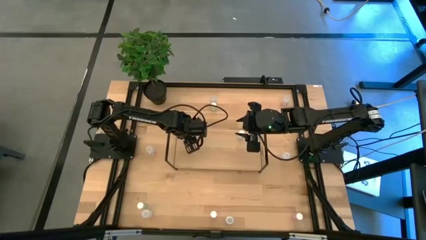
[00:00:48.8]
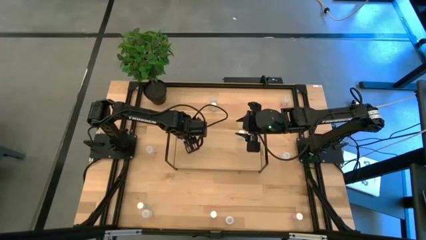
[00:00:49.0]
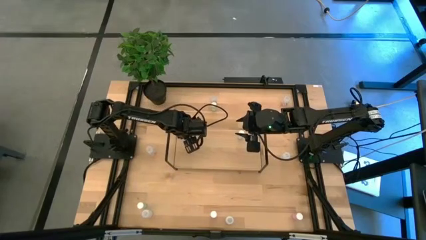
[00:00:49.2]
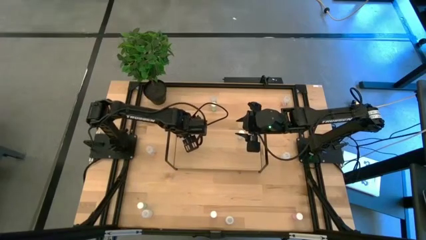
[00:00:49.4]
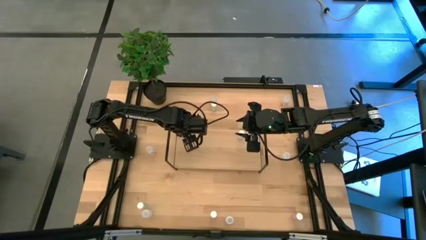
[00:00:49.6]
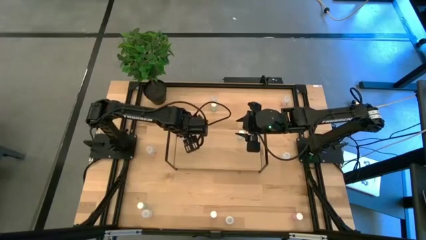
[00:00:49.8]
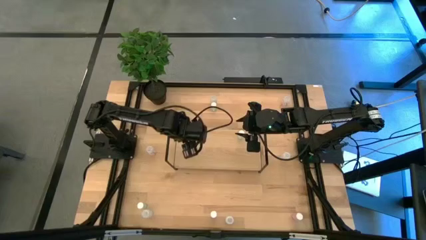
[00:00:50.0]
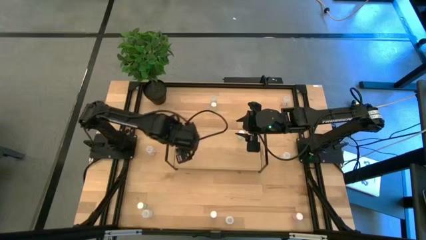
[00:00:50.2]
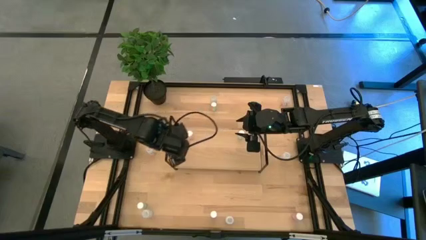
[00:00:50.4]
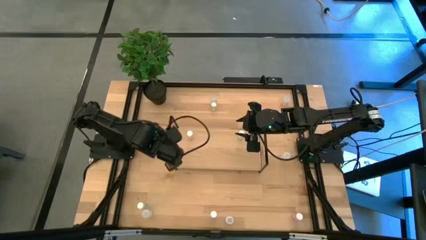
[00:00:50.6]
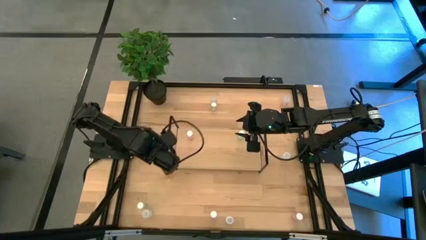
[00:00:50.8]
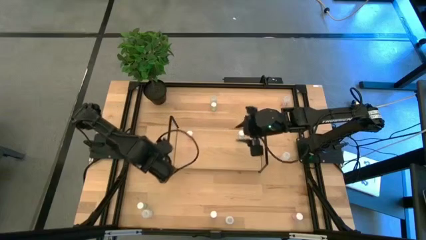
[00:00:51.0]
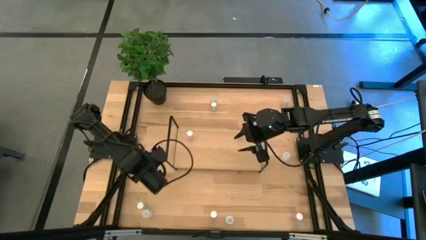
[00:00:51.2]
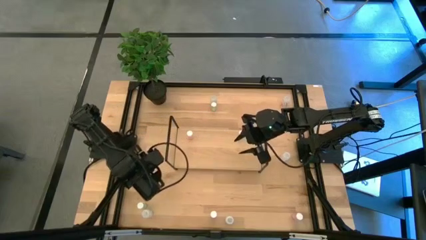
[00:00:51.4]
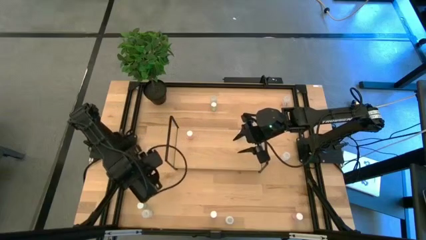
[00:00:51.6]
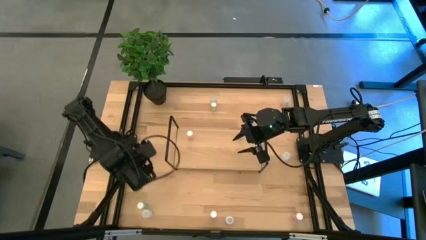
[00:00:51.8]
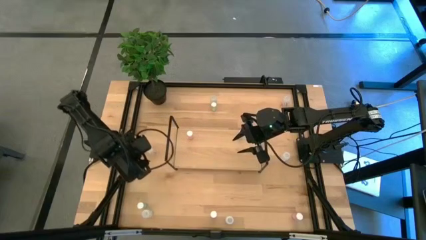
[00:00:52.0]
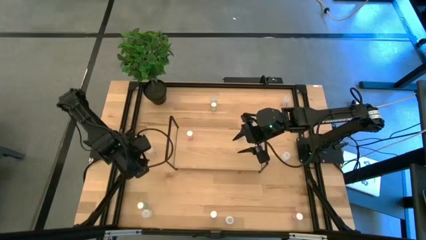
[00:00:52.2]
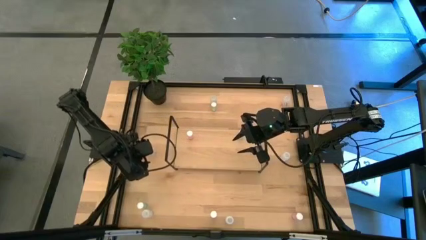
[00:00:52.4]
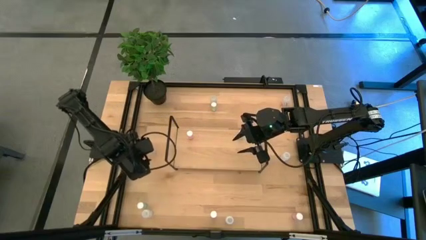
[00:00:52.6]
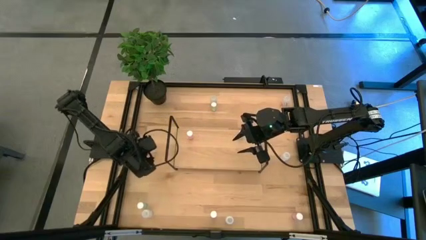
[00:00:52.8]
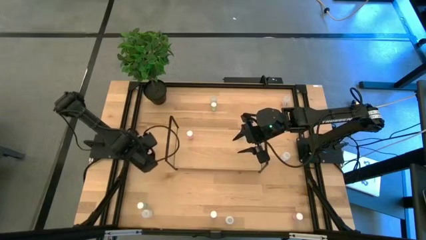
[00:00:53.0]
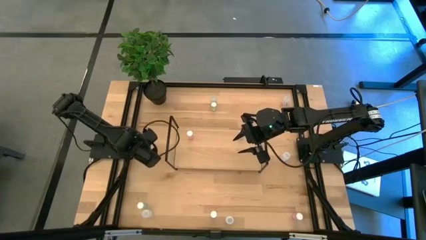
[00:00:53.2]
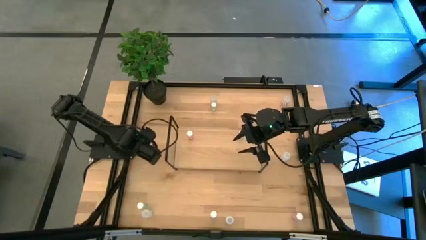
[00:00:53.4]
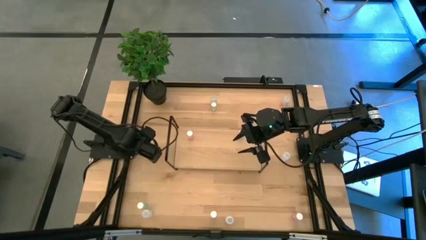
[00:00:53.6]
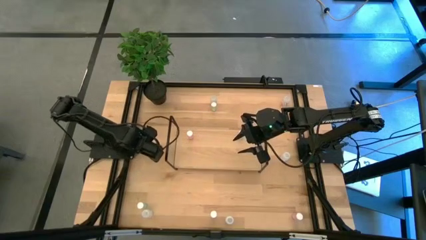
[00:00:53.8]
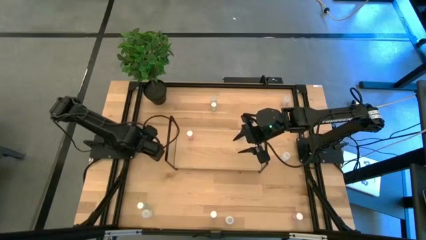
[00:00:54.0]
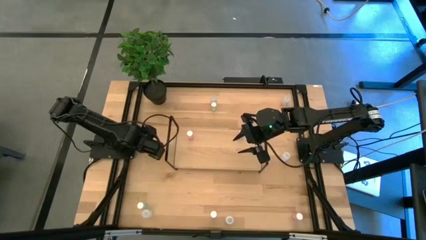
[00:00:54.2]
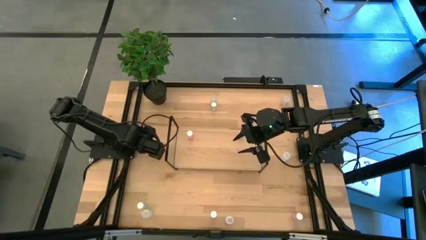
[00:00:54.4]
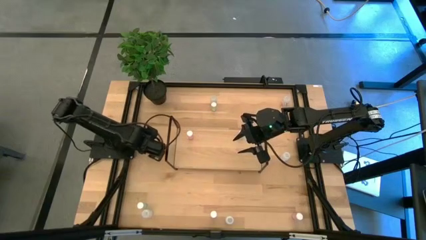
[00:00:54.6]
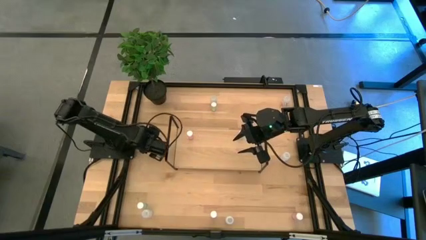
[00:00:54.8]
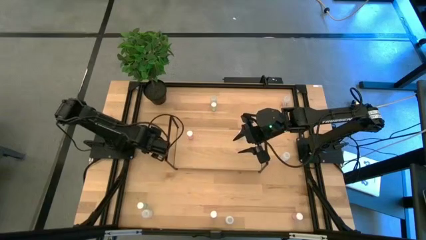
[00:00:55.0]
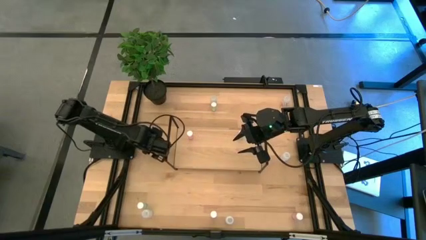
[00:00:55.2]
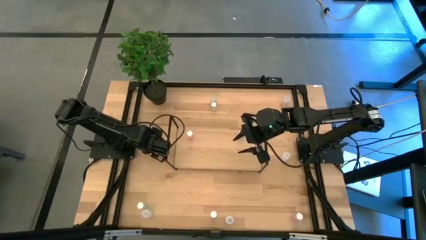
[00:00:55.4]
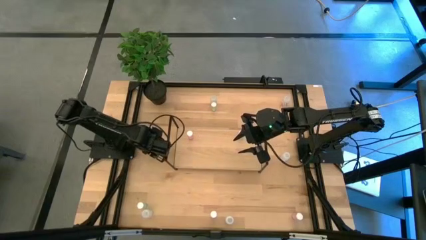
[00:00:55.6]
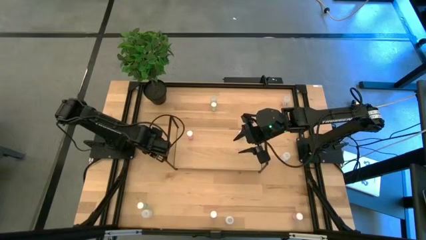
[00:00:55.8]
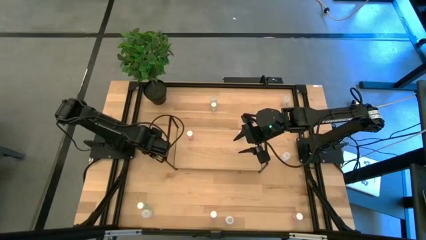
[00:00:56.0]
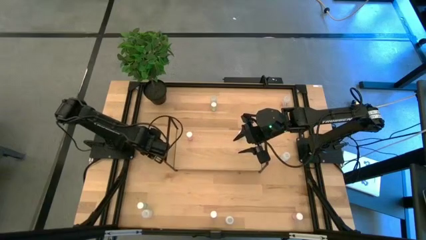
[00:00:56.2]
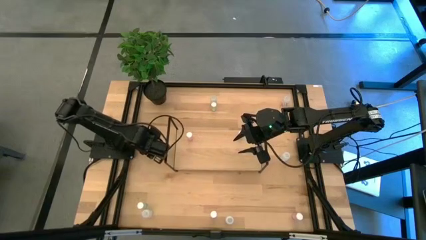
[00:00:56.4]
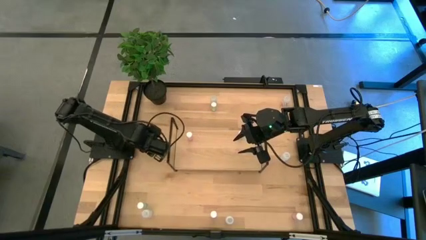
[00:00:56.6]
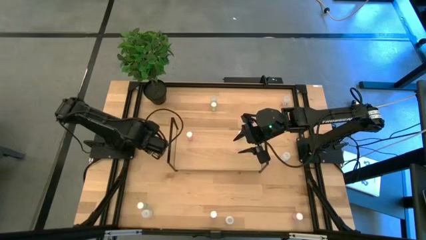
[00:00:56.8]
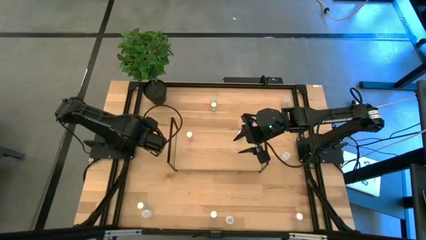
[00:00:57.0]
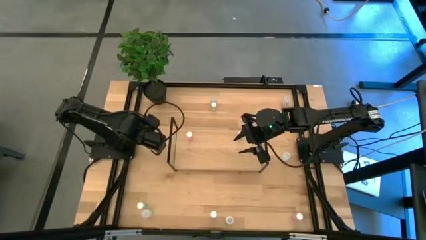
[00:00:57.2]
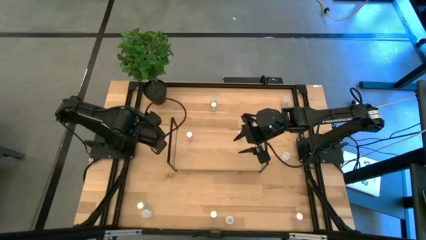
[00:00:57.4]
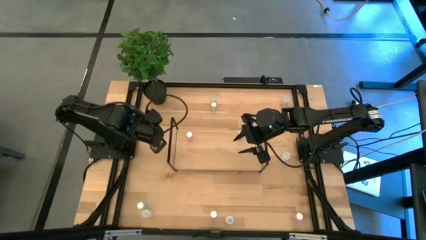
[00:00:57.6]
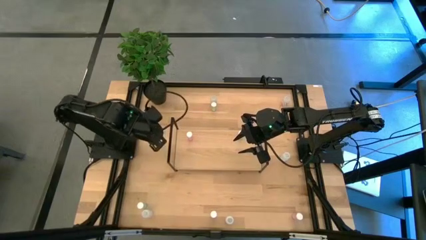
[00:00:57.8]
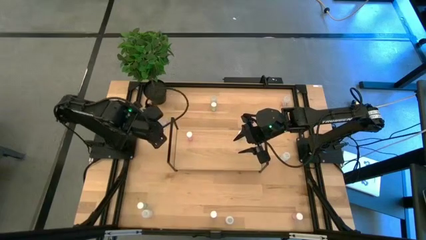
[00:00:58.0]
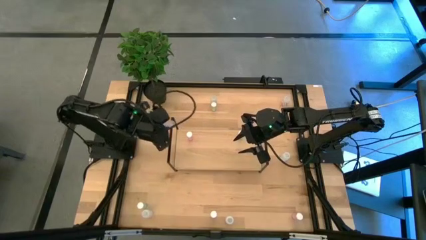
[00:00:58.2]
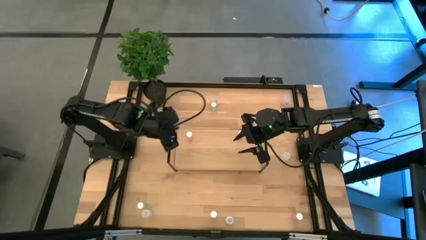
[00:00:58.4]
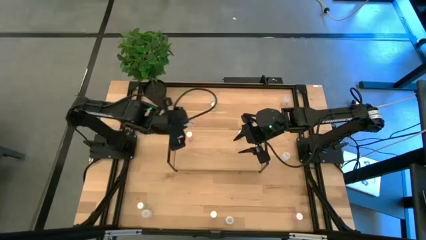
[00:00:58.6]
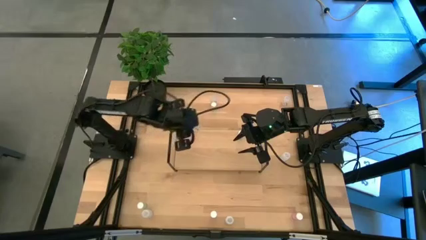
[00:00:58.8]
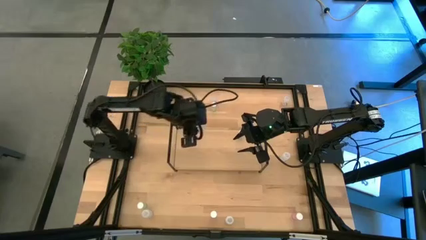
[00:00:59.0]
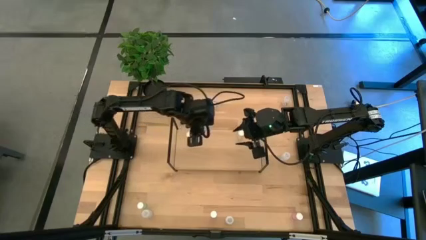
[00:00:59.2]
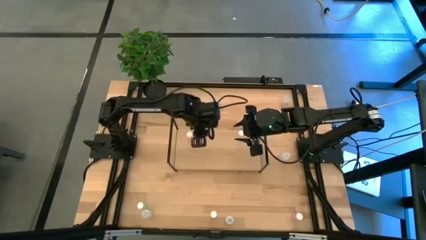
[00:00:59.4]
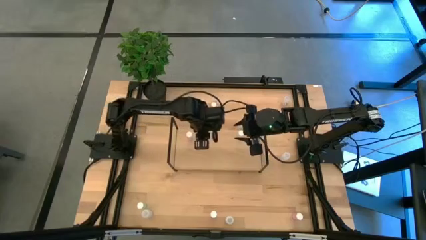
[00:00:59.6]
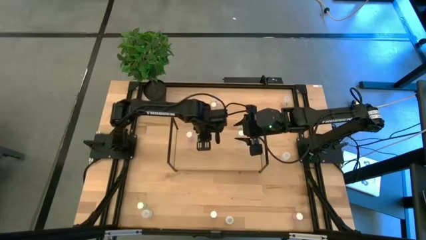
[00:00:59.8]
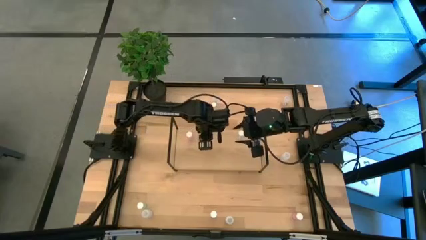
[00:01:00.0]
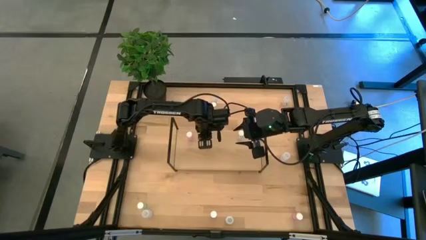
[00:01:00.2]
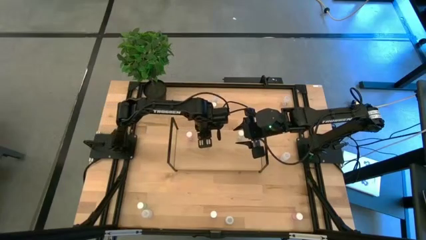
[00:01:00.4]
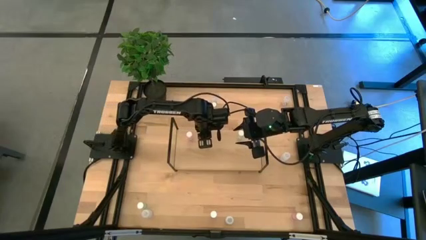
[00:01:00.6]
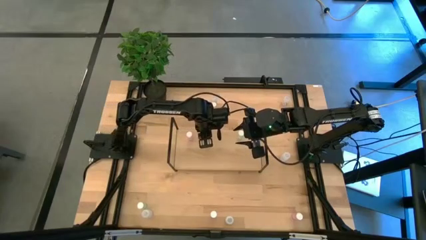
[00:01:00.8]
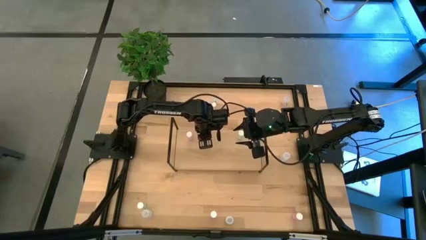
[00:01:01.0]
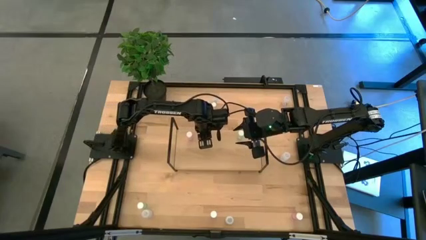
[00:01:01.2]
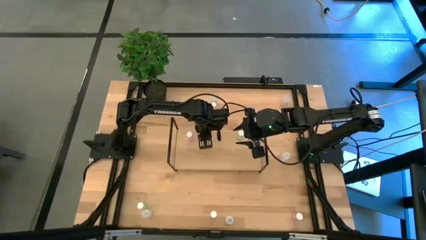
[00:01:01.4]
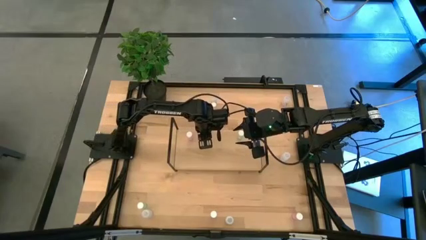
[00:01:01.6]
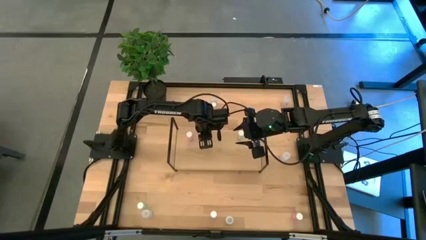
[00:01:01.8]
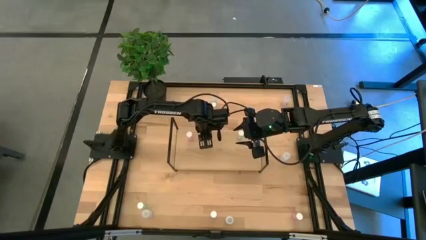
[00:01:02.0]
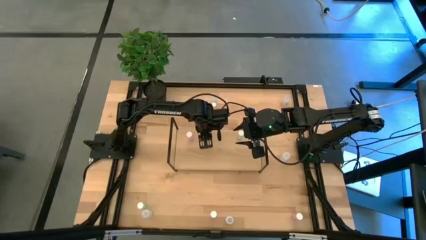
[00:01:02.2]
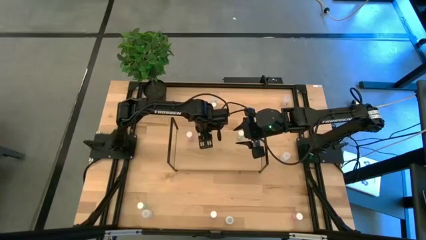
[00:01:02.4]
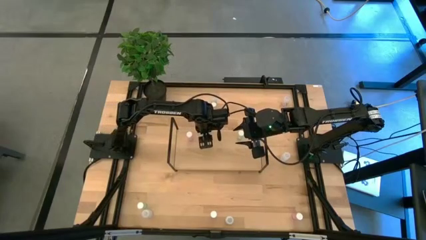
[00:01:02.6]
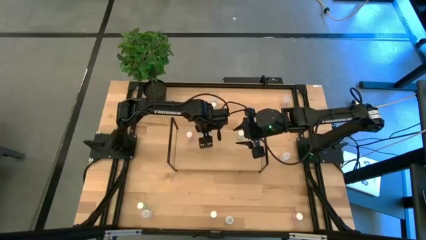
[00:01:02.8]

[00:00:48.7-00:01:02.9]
Task: Pick and place medicine bottles onto shelf by color
Put the left transparent pill bottle on the shelf
